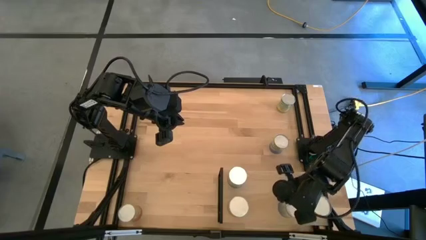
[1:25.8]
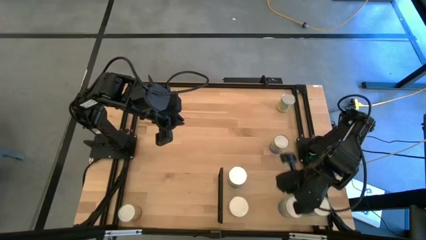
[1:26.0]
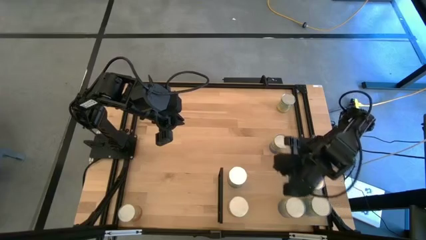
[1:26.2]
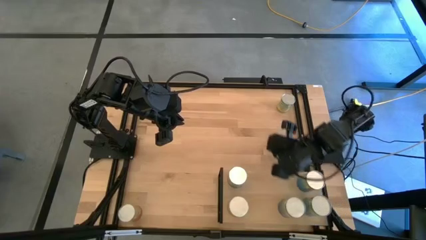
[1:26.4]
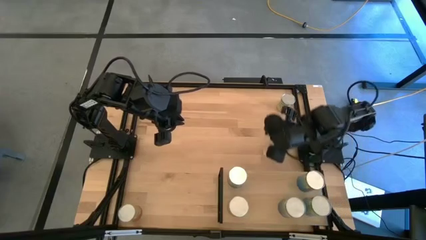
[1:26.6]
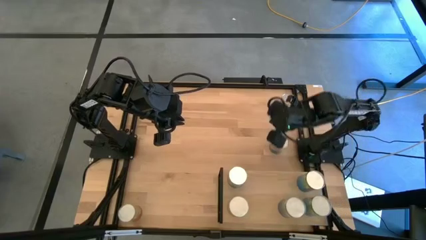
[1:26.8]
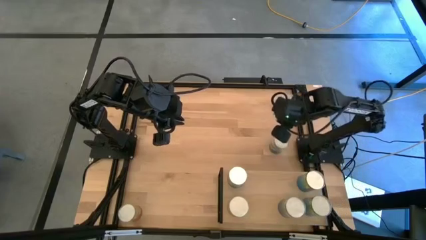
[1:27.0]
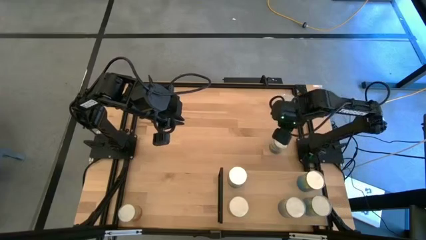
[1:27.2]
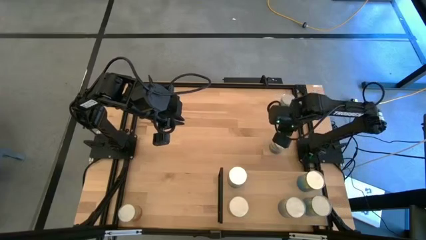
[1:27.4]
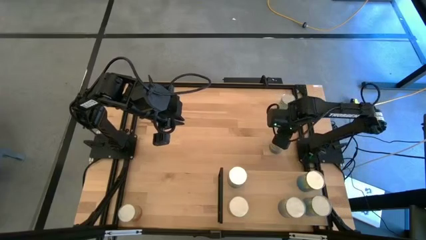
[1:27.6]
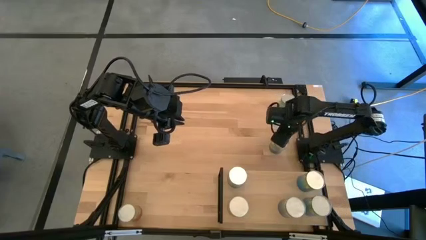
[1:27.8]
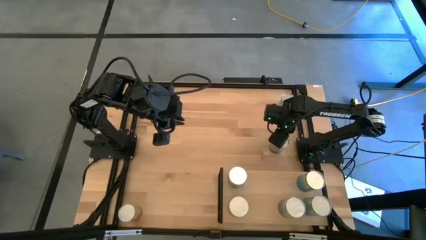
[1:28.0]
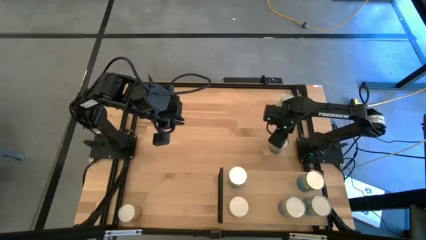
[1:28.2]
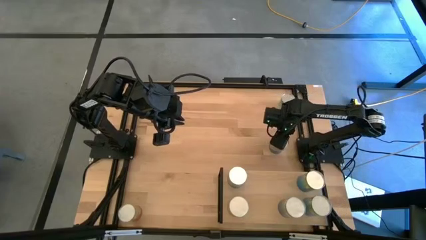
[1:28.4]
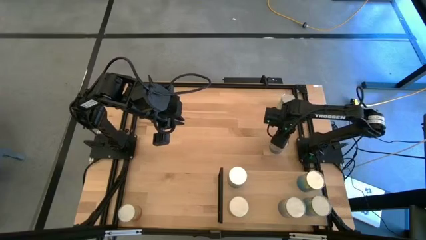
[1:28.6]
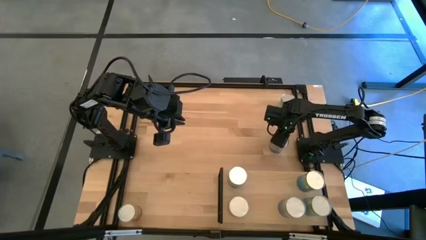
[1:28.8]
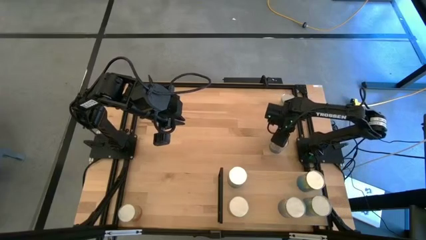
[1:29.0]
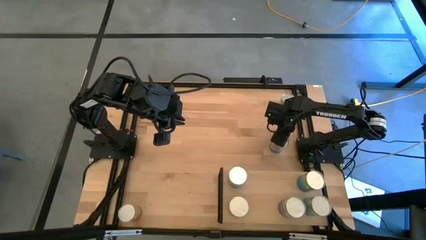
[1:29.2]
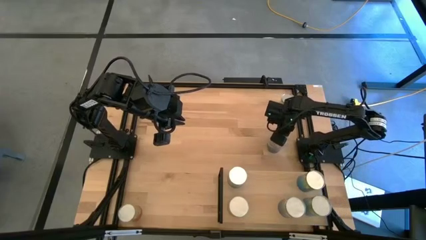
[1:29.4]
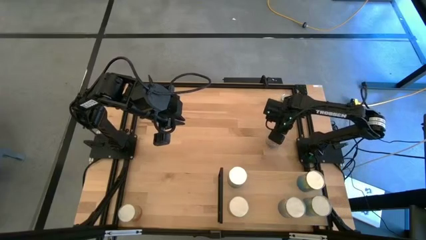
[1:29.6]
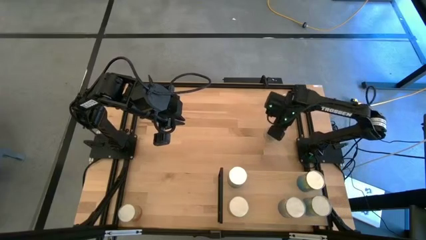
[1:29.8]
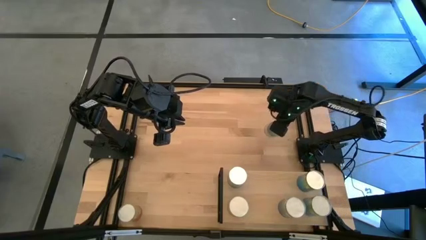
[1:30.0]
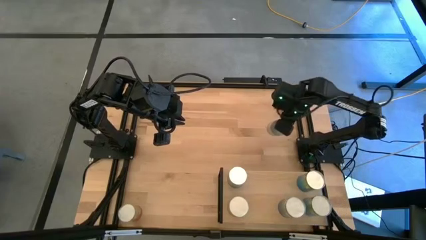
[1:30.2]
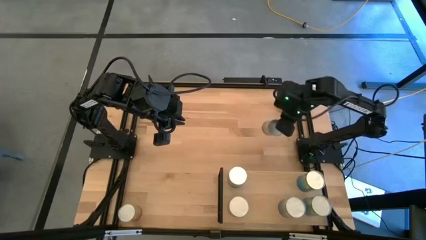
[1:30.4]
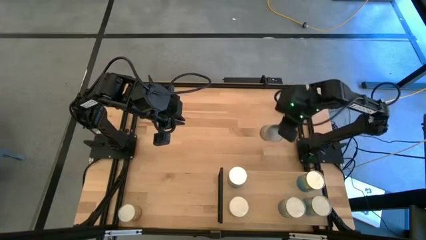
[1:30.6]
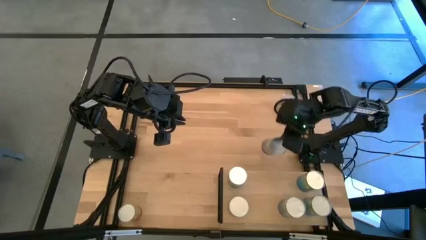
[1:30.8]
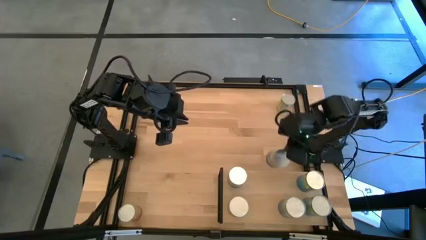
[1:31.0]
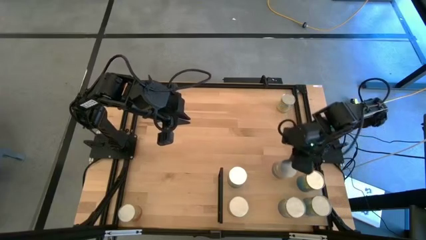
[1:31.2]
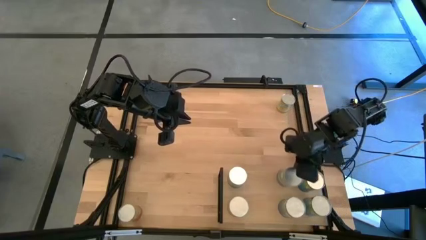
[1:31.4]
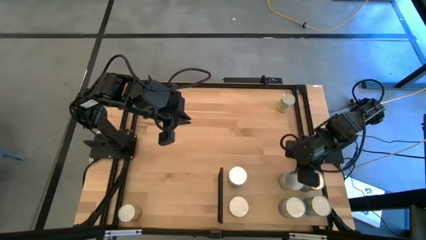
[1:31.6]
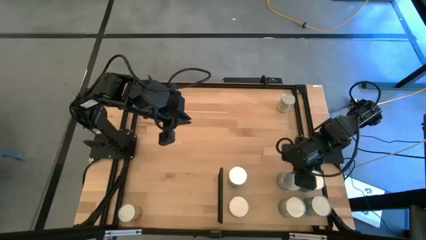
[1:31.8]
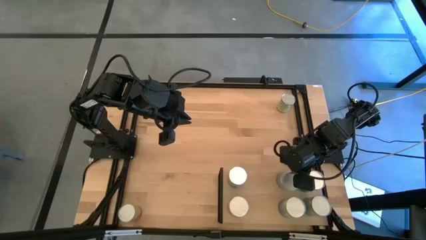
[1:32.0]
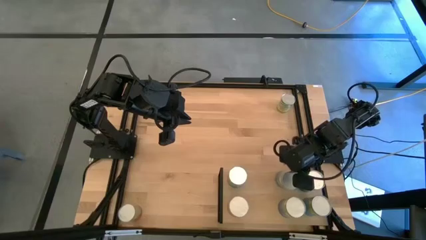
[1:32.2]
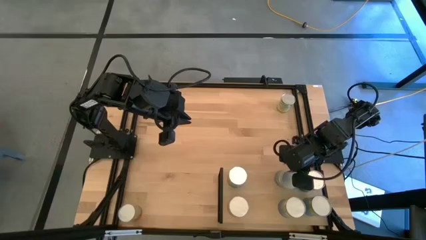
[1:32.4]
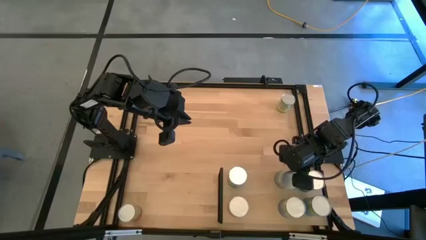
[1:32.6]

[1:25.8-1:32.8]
Task: Pick and place cans onto a shelf
Put the canned peas on the shelf aligned with the other canned peas

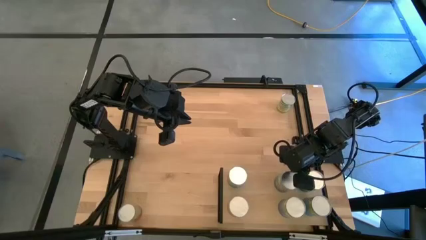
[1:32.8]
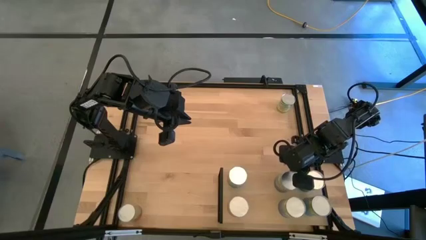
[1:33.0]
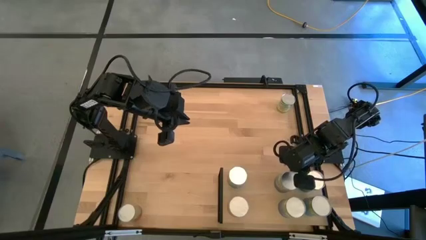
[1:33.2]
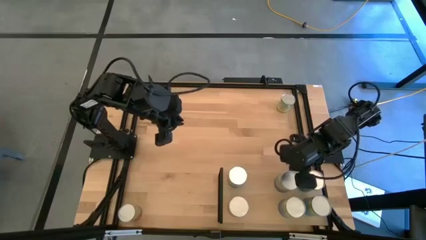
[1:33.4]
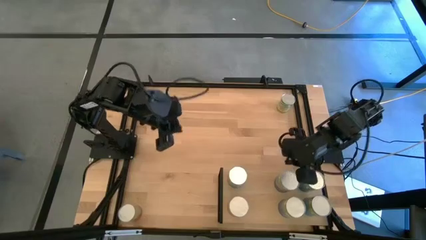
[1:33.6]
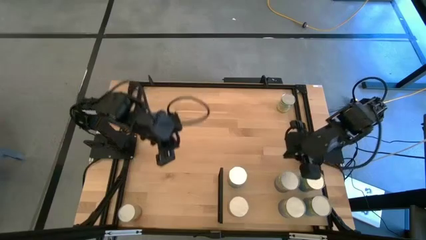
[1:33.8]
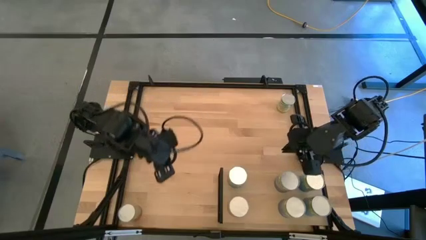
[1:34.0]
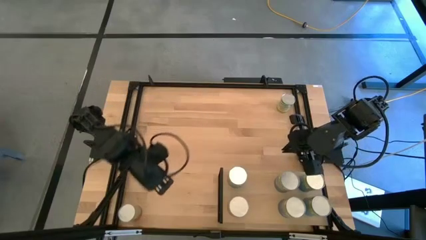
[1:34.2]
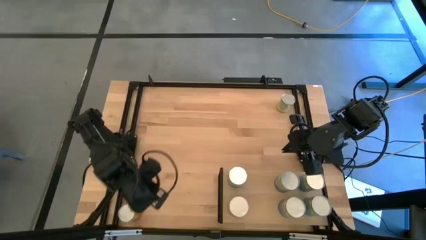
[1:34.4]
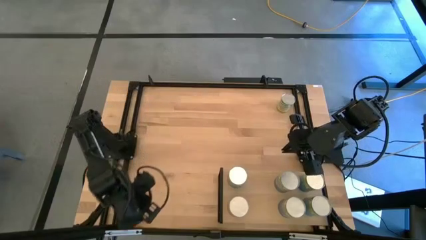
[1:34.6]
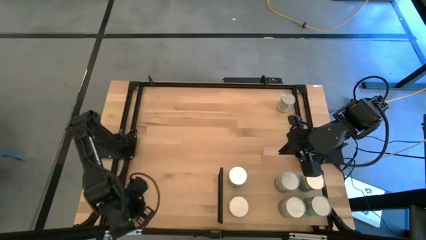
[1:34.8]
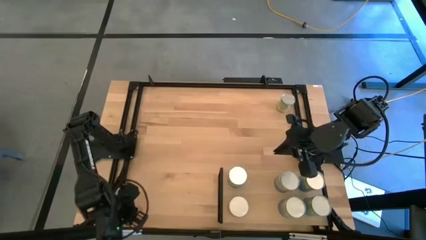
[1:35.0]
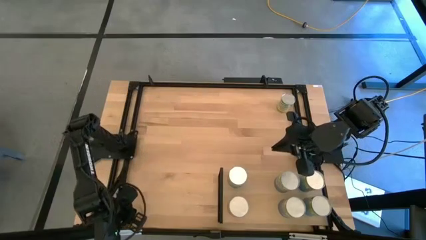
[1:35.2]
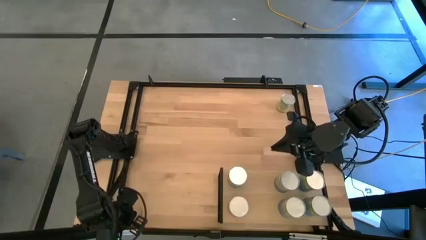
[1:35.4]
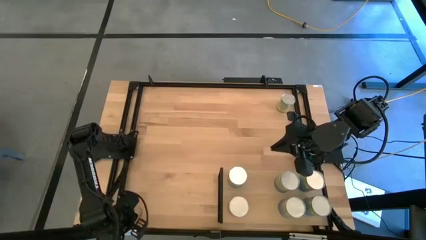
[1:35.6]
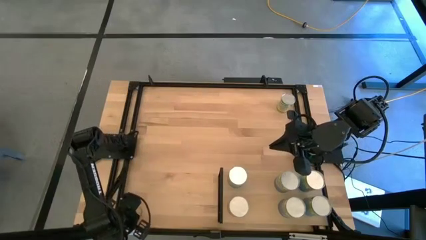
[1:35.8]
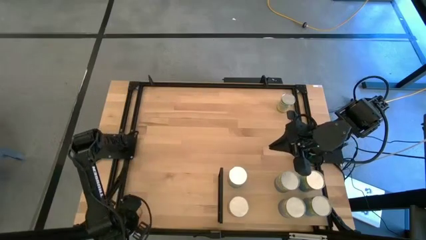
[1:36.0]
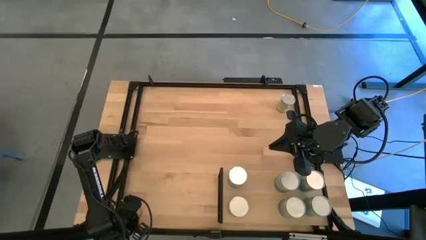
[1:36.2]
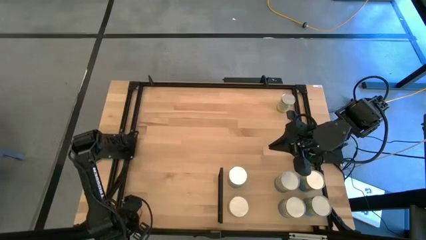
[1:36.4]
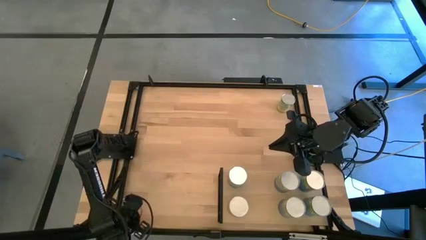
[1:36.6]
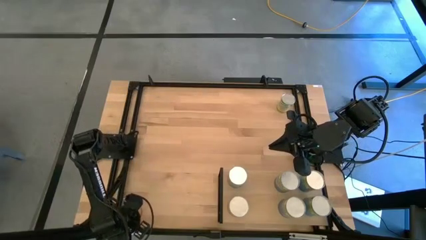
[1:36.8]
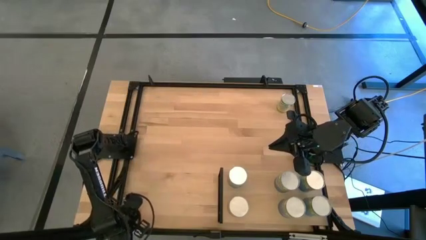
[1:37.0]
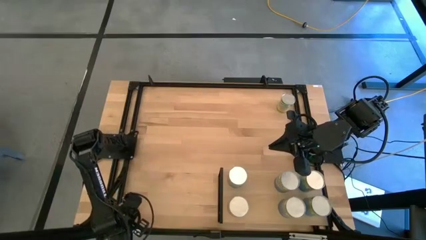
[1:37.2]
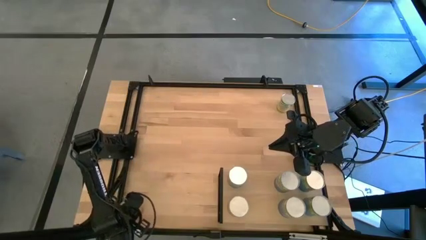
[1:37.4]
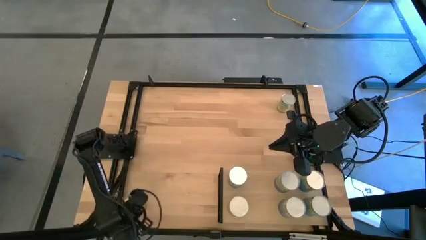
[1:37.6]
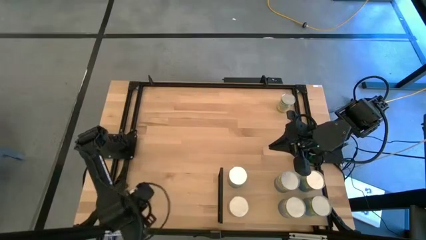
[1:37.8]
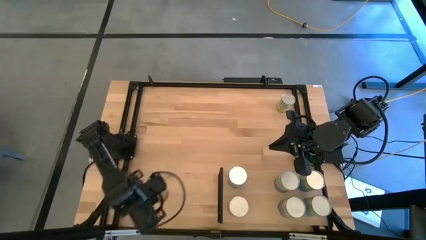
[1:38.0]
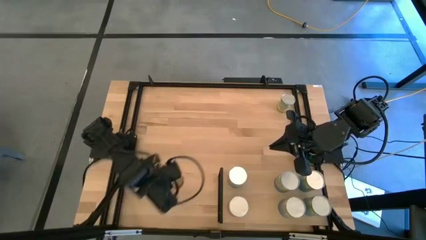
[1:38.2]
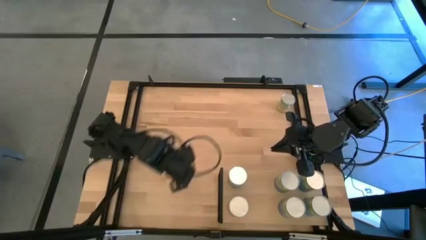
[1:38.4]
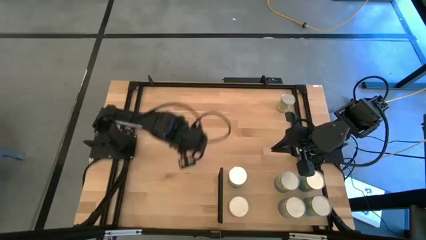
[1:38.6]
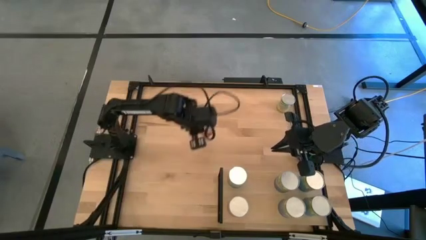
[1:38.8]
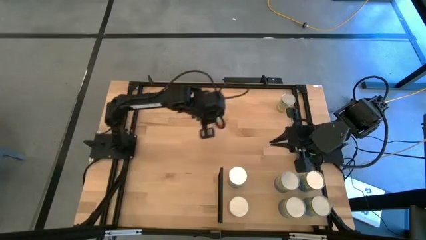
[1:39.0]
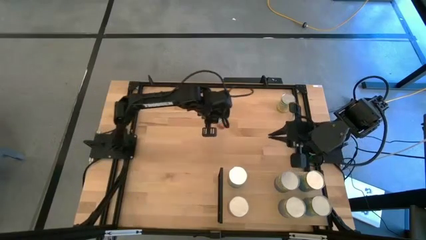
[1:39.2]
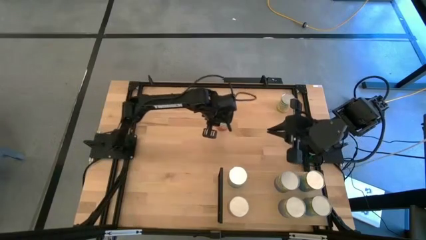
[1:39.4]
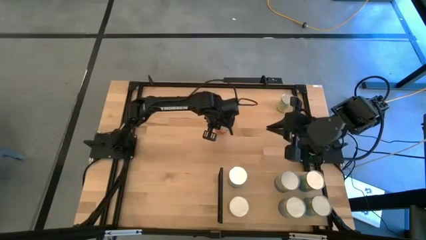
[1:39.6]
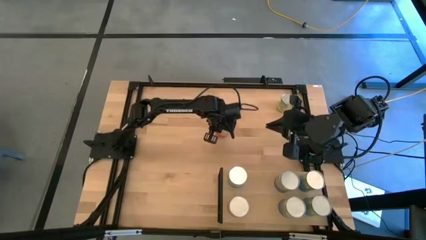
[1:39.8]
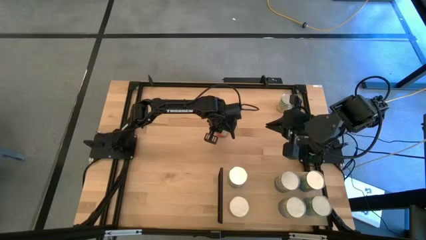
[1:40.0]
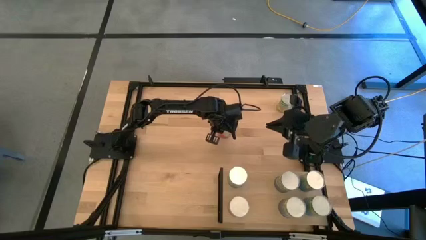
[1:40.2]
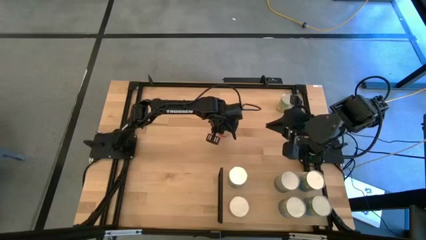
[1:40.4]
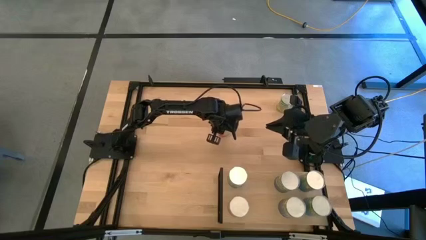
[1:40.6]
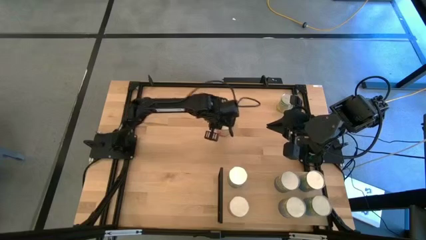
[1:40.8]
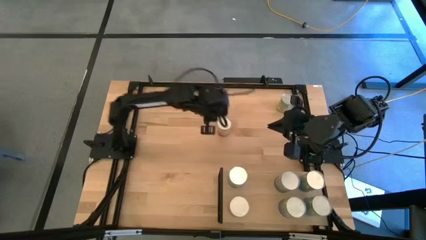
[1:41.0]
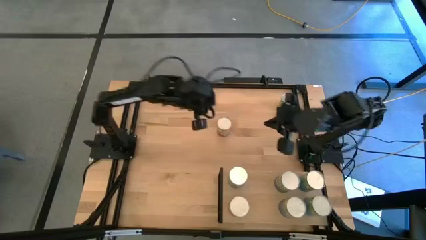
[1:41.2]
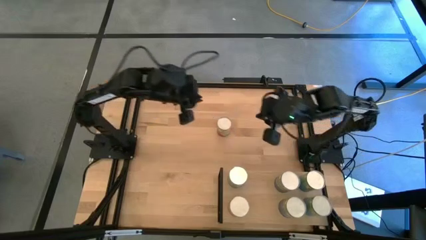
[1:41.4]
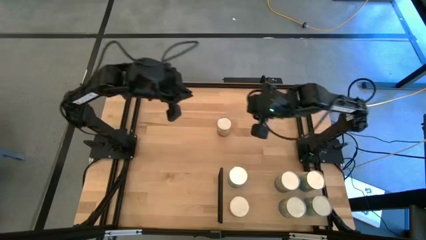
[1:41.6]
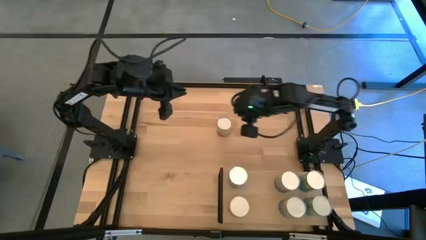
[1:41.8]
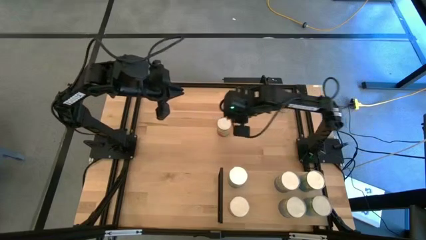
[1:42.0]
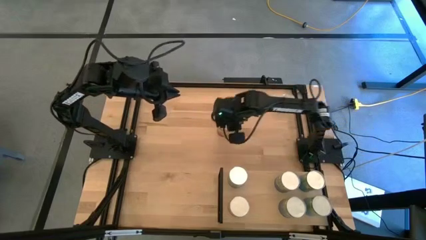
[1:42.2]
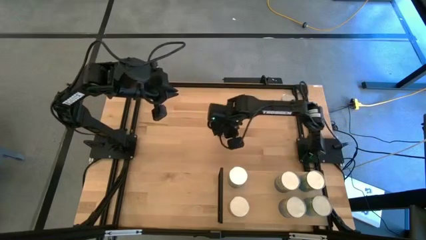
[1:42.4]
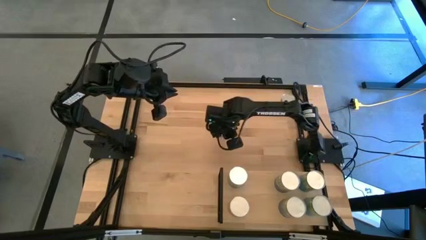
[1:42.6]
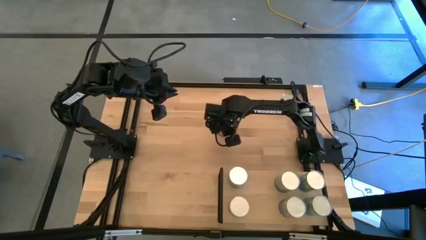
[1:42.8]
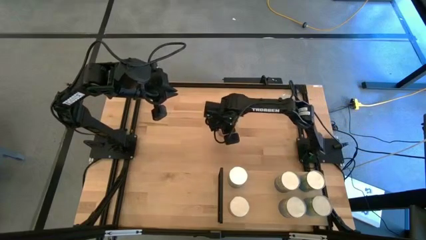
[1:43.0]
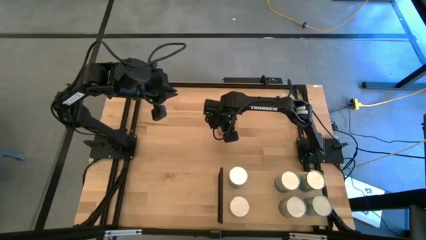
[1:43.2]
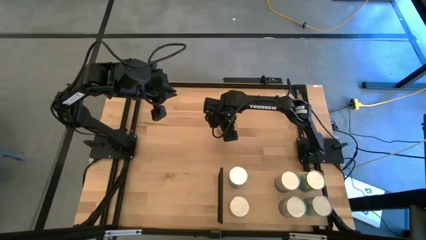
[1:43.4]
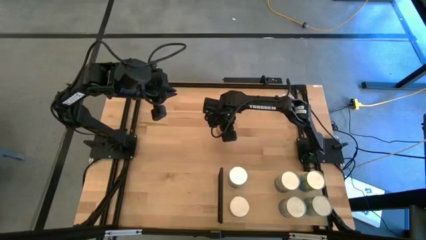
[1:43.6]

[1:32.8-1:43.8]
Put the canned green beans on the shelf
